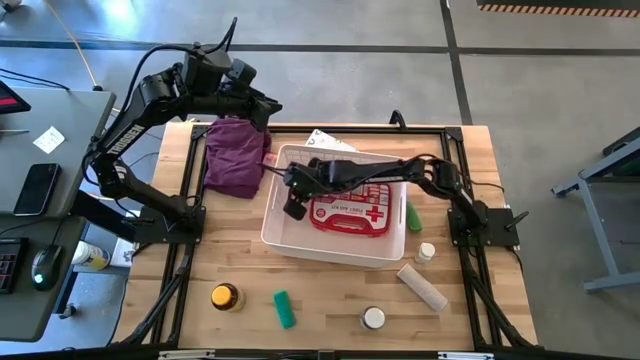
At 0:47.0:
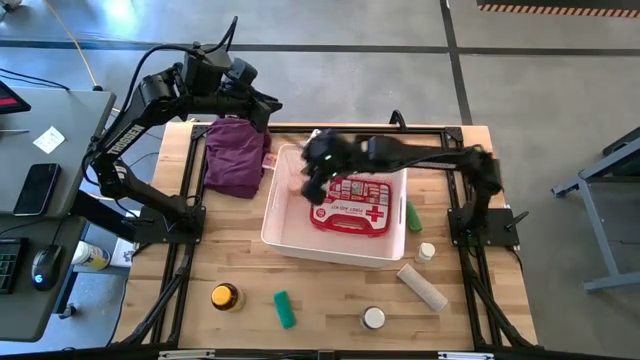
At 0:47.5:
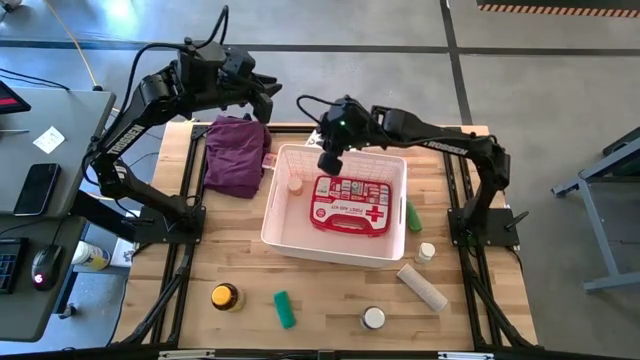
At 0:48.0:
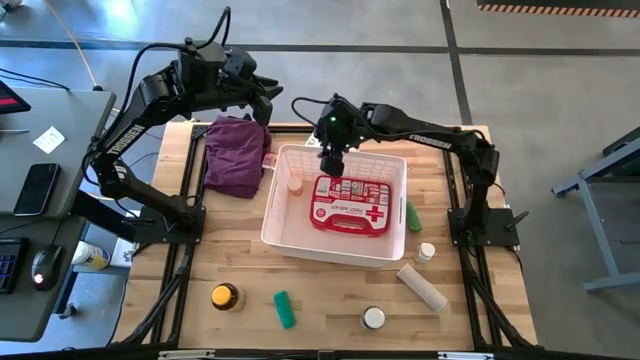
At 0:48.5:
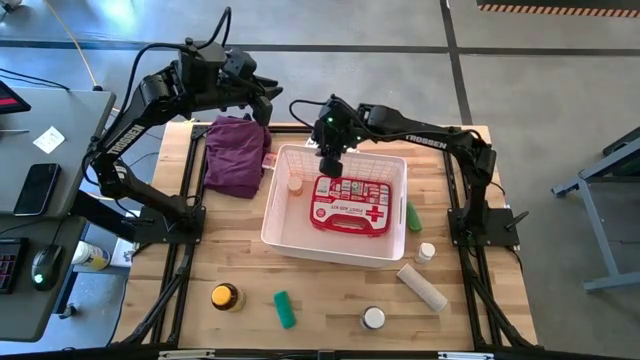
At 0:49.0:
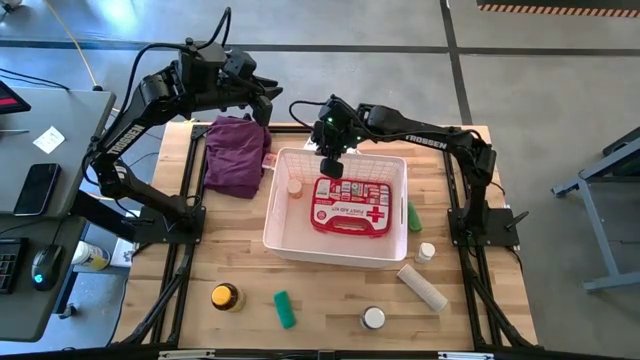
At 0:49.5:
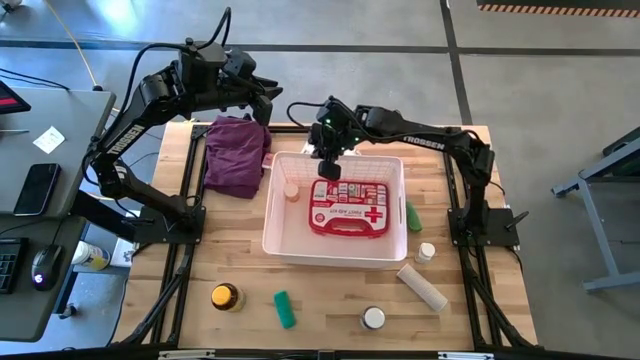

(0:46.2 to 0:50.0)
Task: Pick & place medical supplies in basket/bin
Adjust the white bin

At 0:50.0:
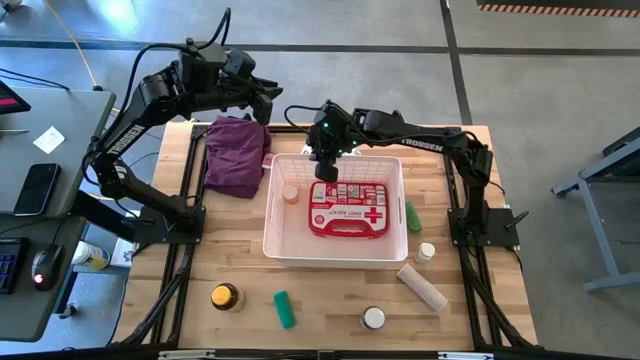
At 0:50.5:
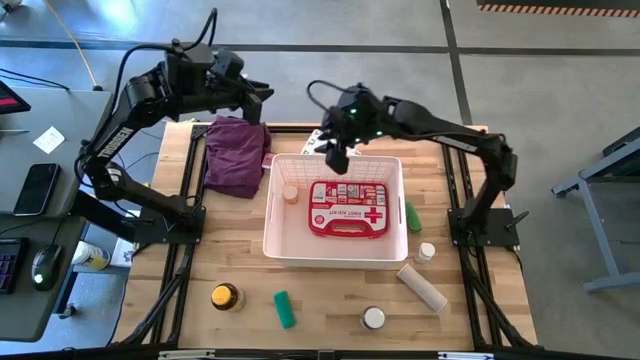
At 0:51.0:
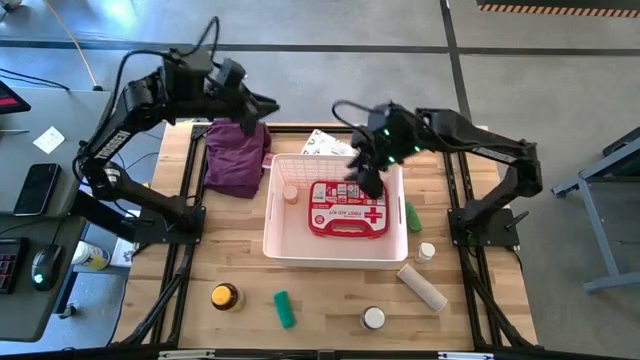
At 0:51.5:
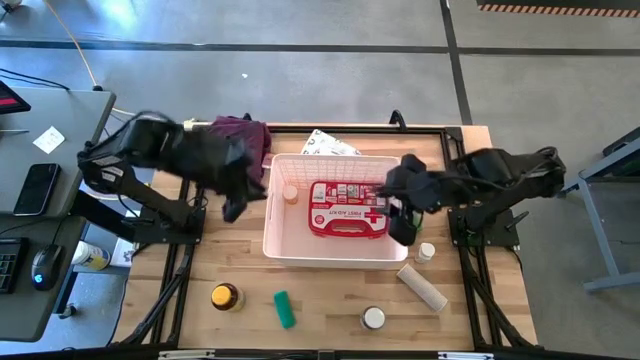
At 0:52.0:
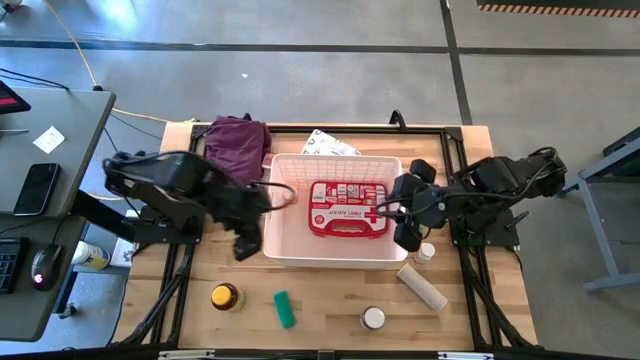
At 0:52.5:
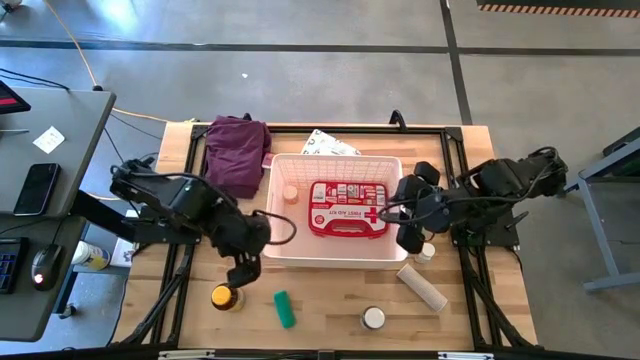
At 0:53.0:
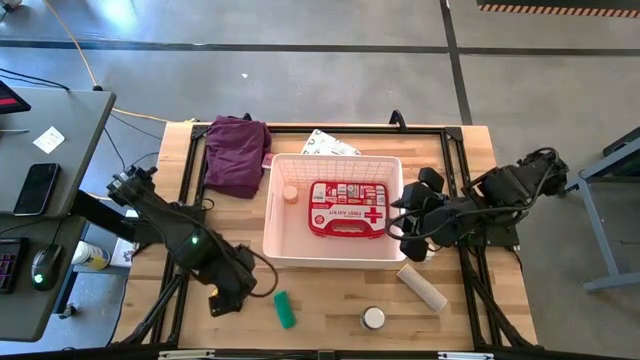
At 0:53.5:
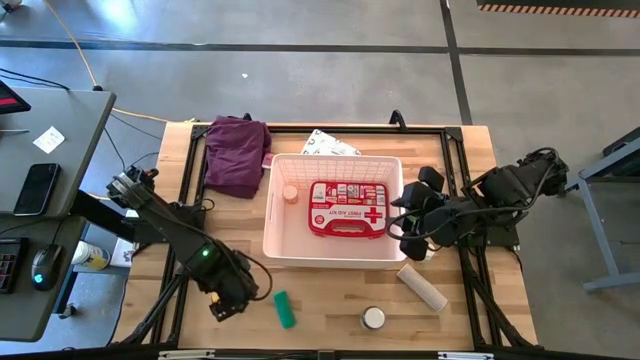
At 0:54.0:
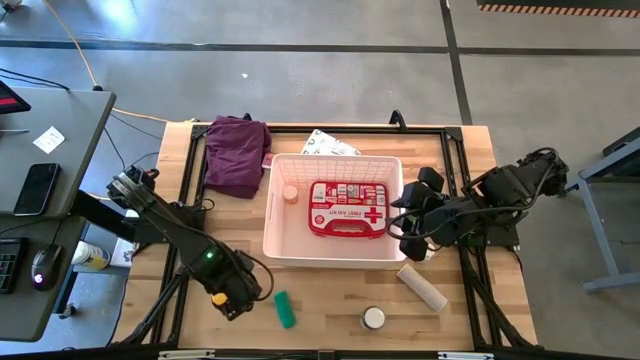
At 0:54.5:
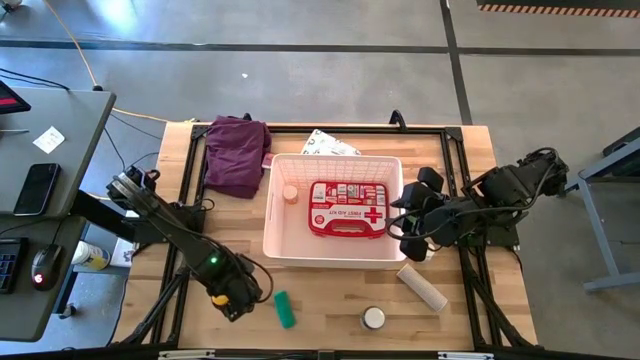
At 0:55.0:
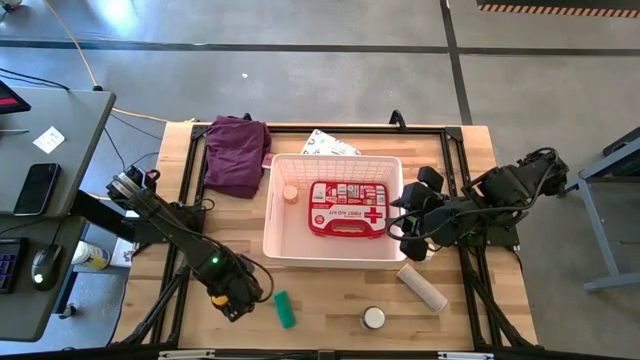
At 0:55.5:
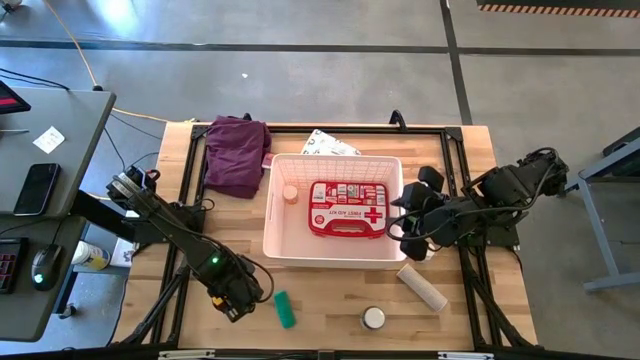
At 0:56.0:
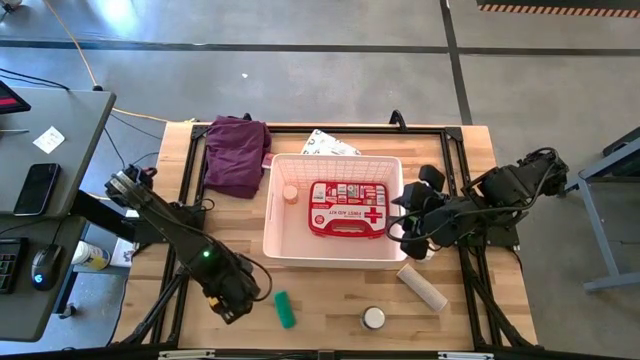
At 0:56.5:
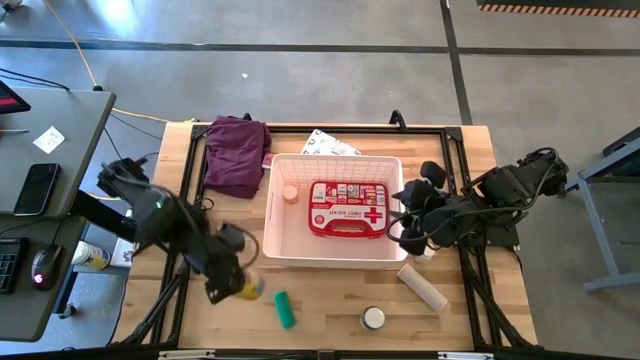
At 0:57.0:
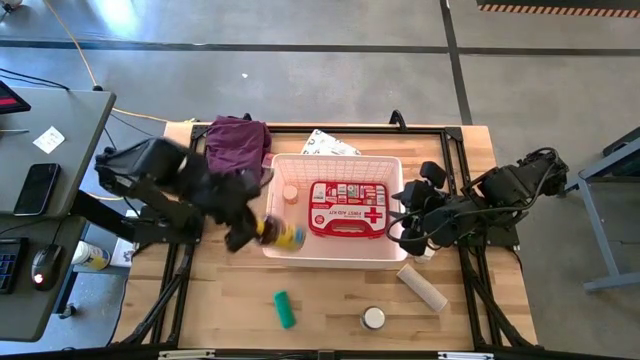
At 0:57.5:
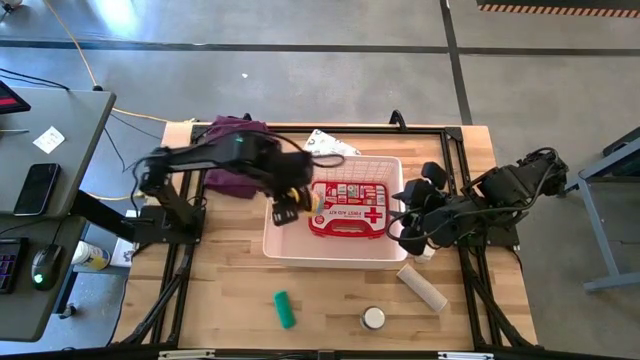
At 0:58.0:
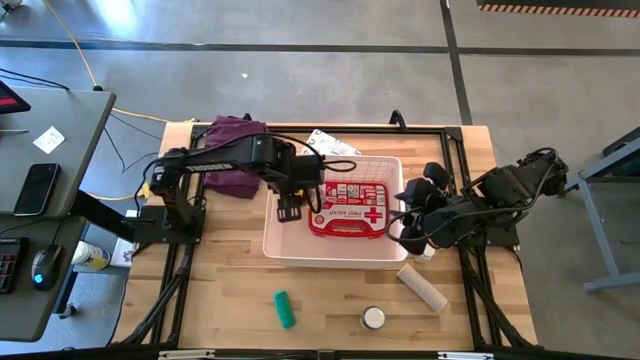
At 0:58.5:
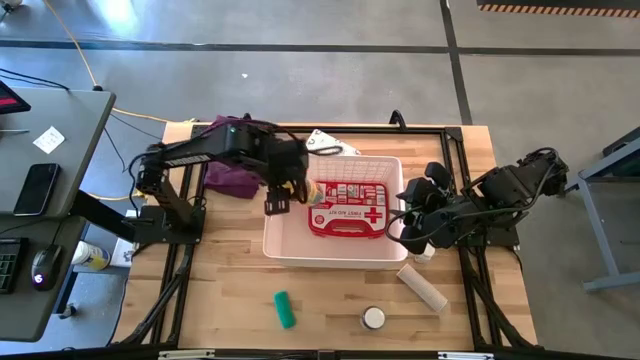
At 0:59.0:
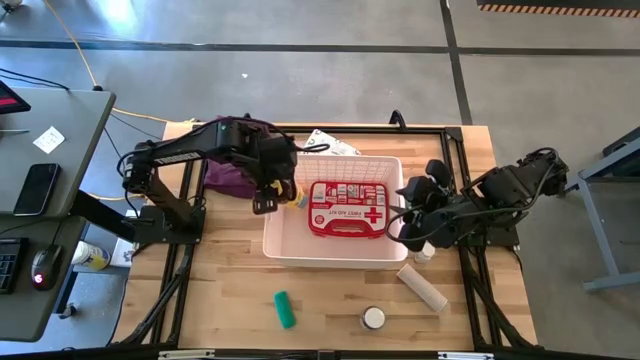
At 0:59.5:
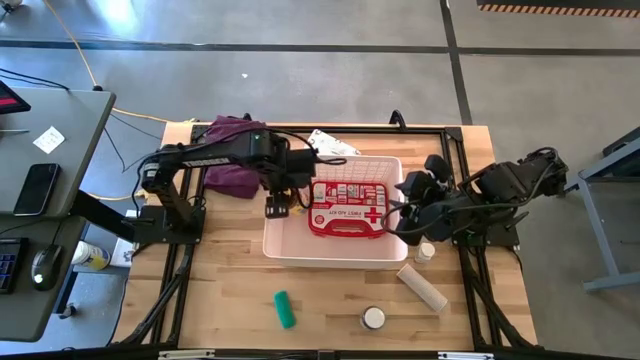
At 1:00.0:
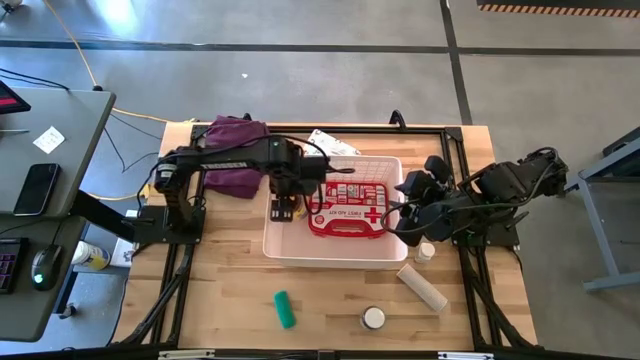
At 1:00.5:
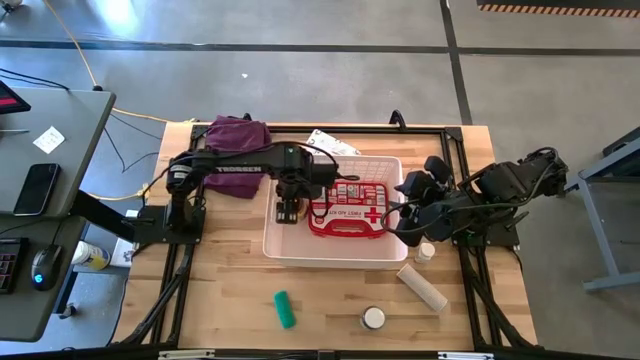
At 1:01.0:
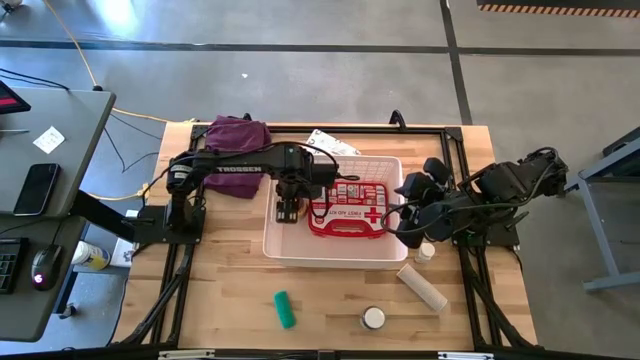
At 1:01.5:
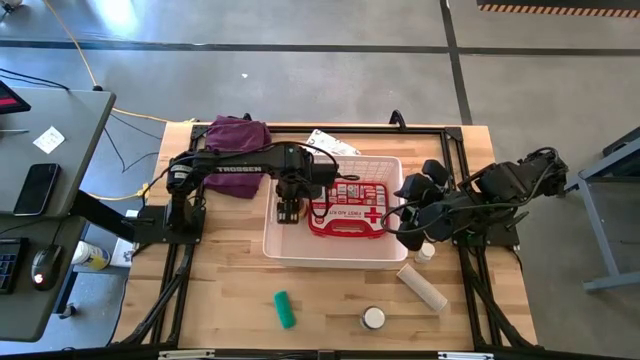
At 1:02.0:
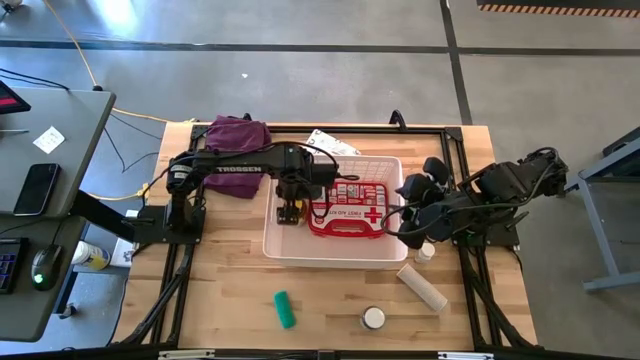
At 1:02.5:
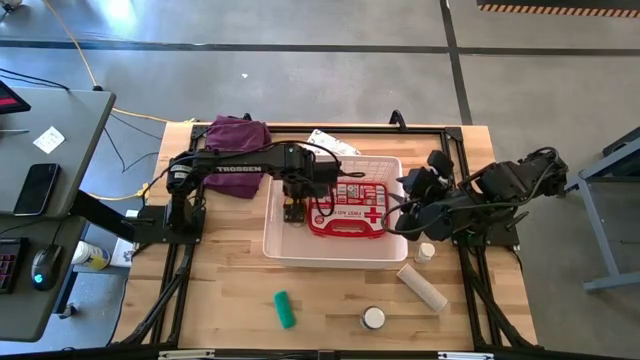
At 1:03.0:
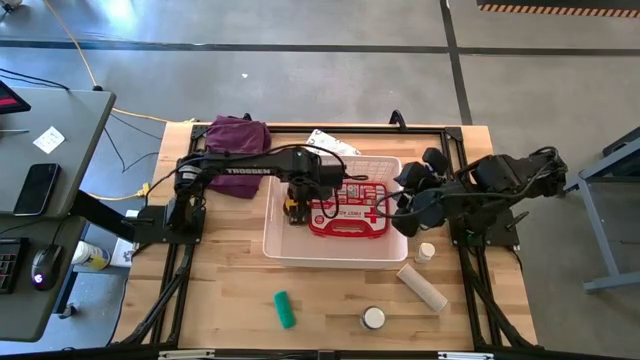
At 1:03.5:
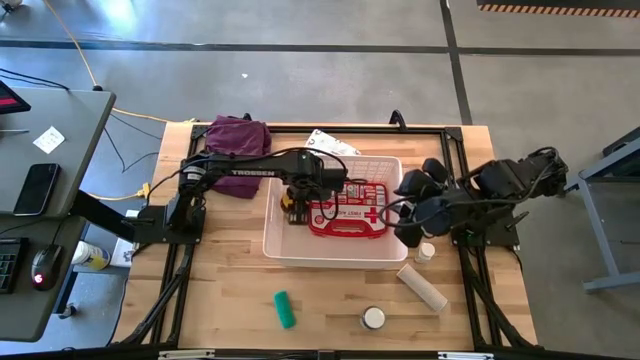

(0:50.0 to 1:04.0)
Put the yellow medicine bottle into the white bin

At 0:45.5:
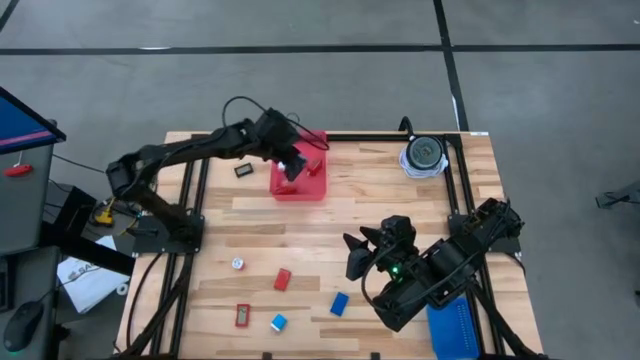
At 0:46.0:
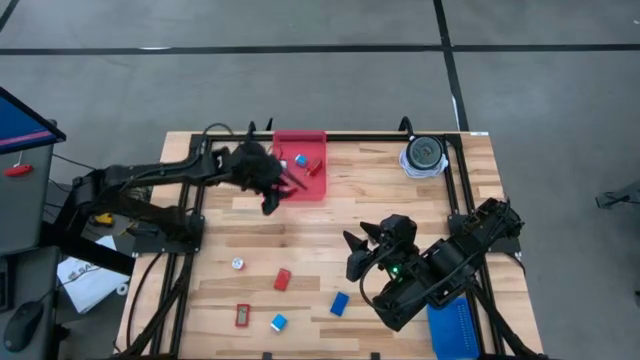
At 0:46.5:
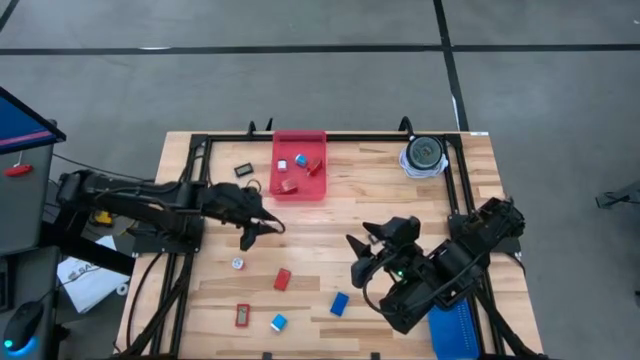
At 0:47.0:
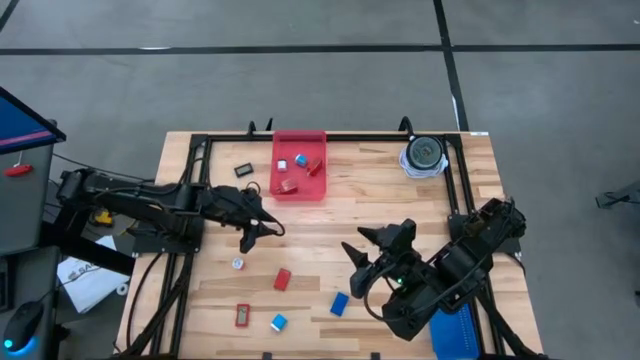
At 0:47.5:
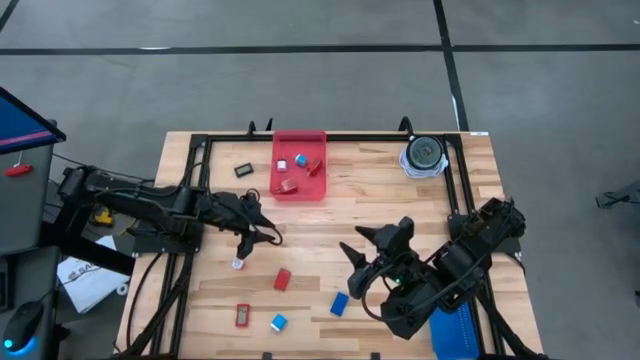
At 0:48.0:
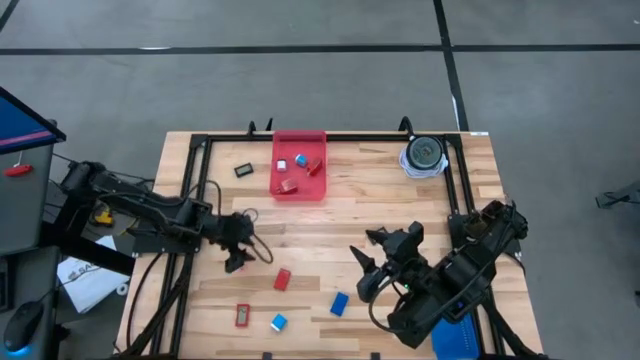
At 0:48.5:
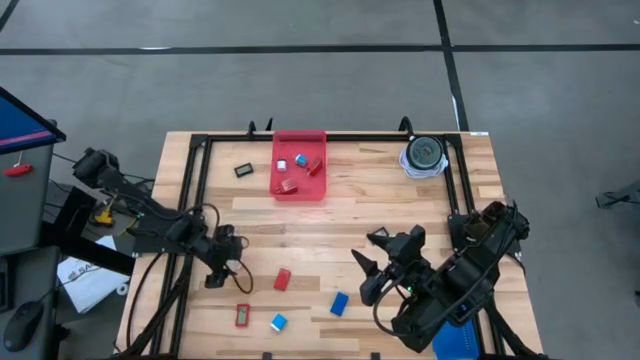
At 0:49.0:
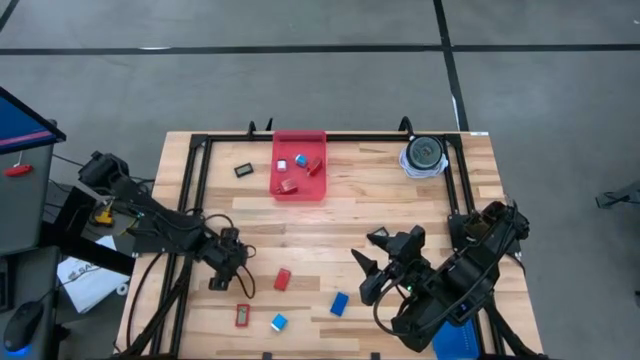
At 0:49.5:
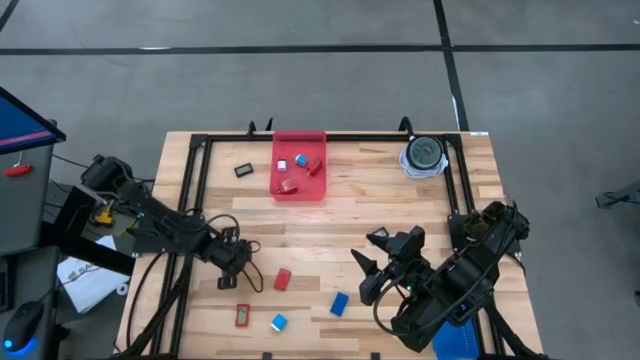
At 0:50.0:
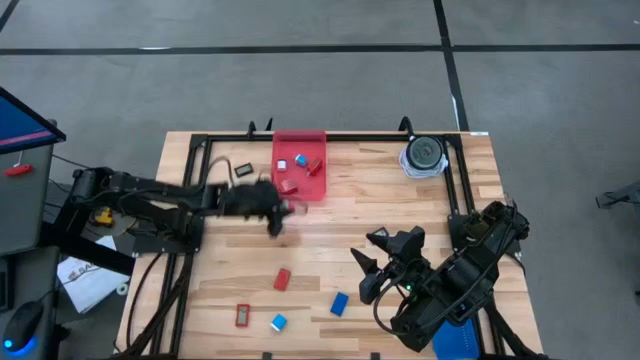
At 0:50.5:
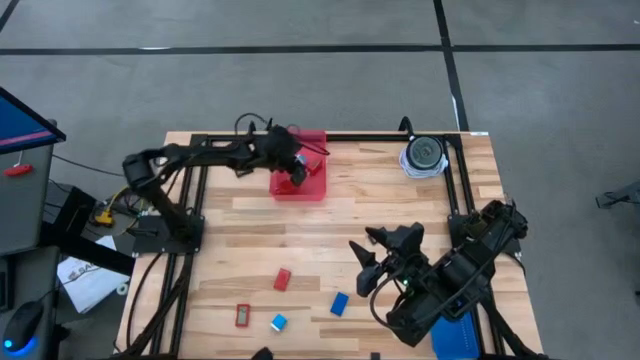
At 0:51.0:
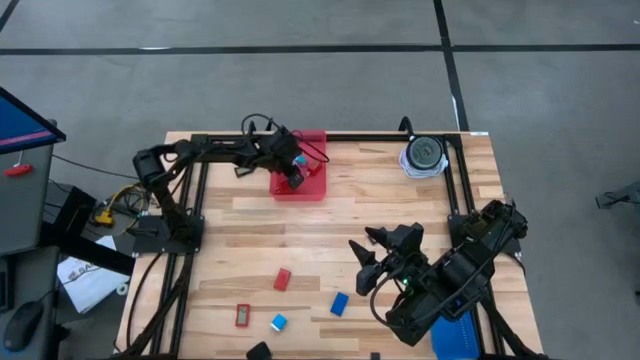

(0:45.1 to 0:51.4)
Task: Pick & Place Office items
Put the pink and white charger adapter into the red bin
